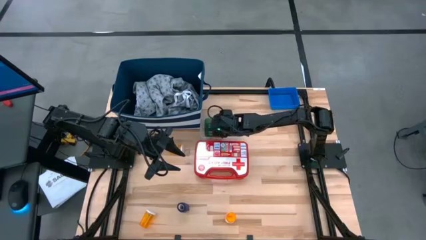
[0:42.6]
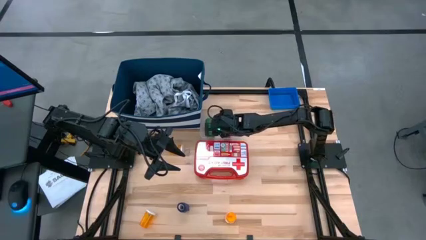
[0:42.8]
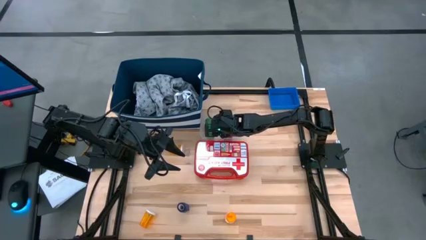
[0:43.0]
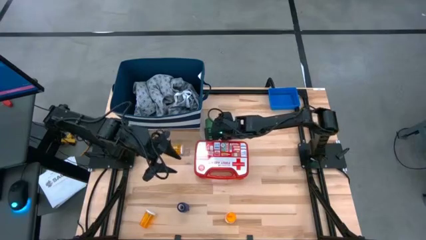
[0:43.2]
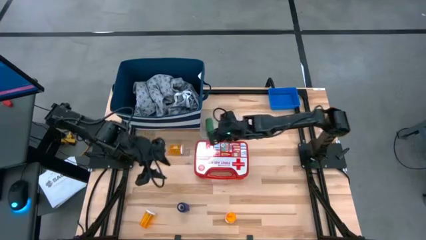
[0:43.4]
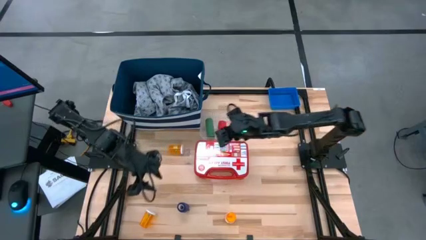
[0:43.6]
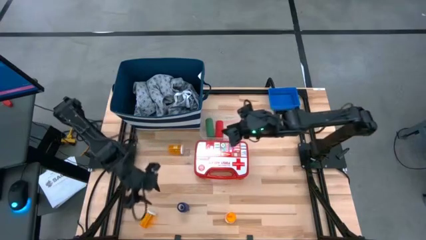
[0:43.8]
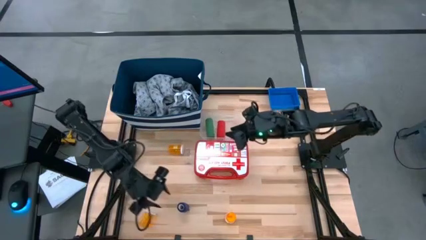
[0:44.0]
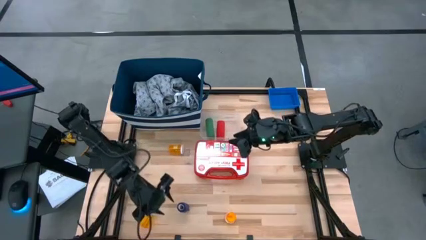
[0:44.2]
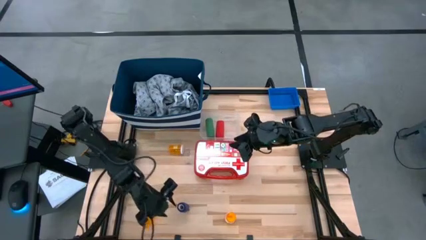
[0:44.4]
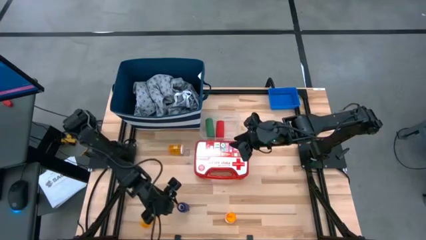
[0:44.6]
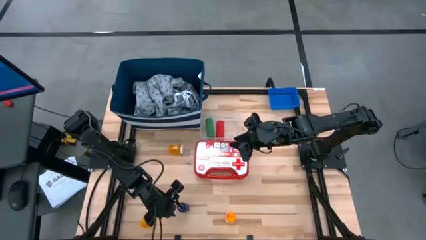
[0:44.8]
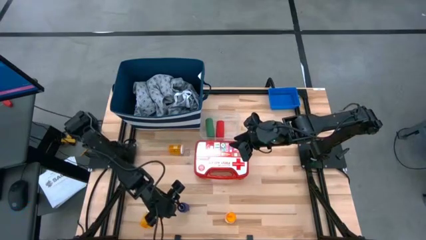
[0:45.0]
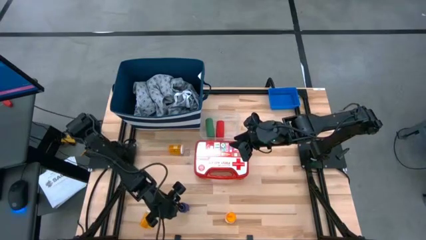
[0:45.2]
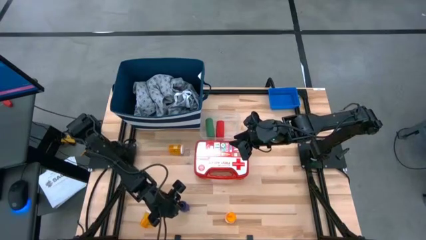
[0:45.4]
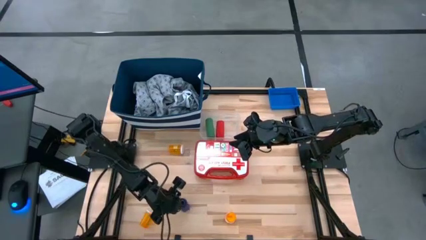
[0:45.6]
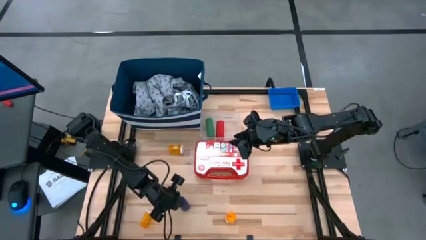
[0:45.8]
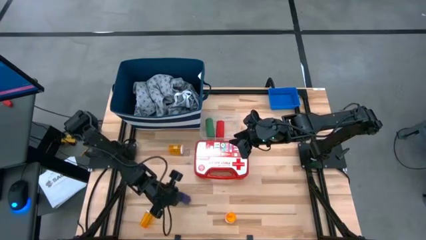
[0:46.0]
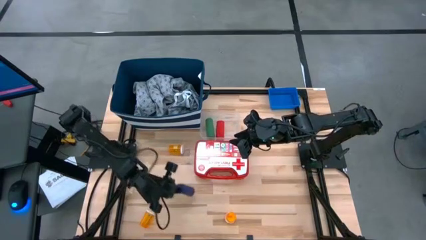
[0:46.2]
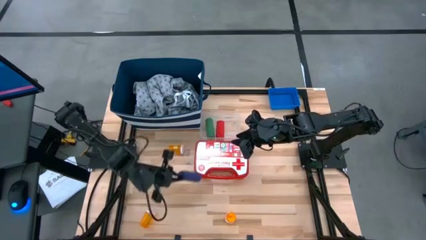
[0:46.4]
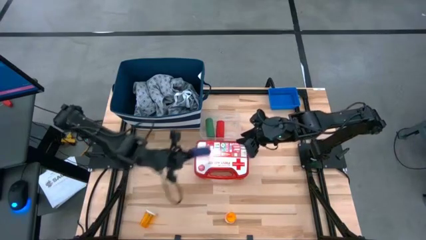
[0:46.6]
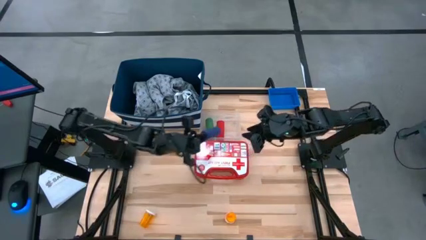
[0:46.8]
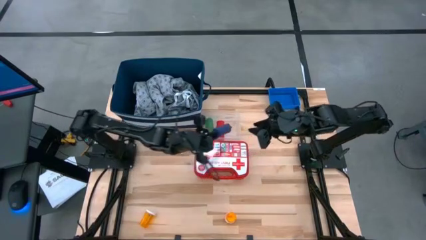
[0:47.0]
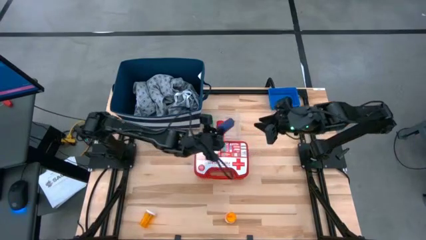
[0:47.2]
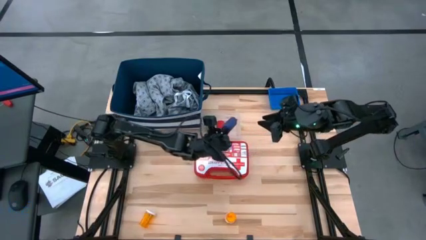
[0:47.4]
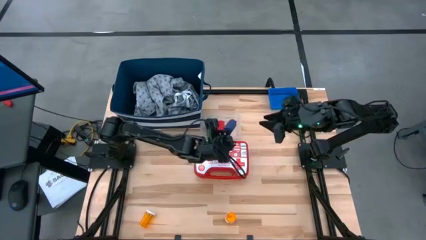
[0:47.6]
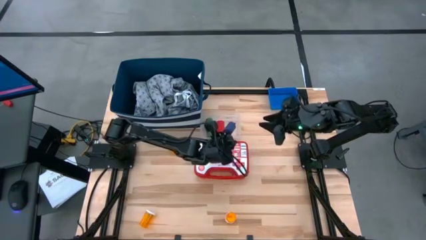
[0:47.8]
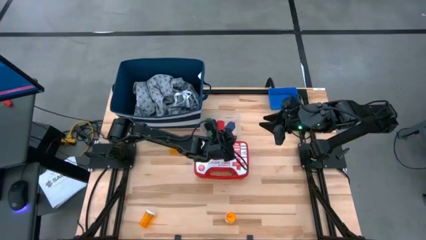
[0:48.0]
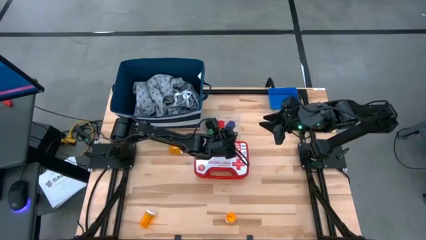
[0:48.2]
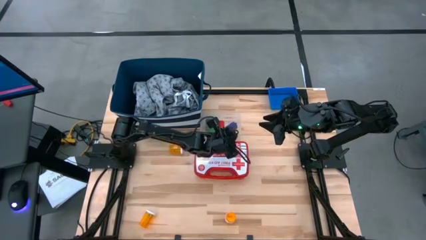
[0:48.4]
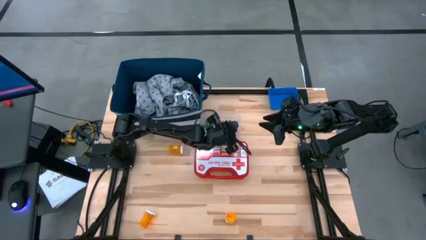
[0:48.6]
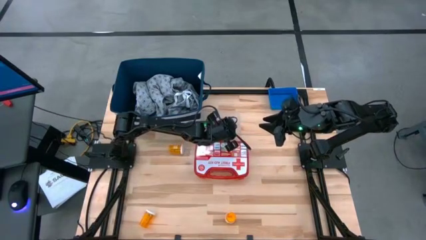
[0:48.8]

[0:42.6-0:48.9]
Task: Pick & place medical supplies in basket/bin
Put the rolled blue bandage into the transparent bin

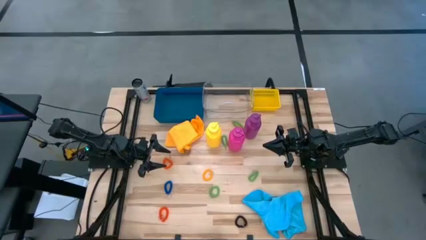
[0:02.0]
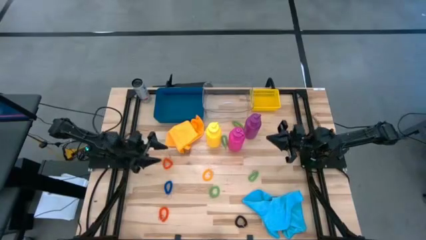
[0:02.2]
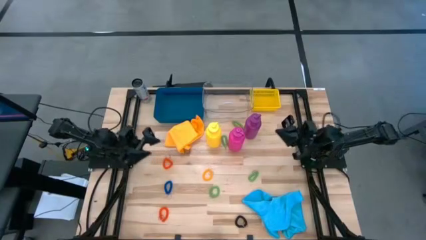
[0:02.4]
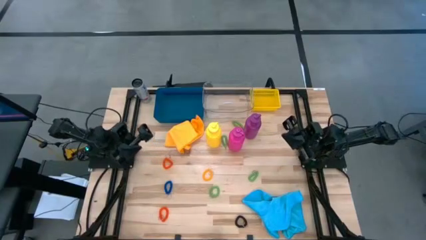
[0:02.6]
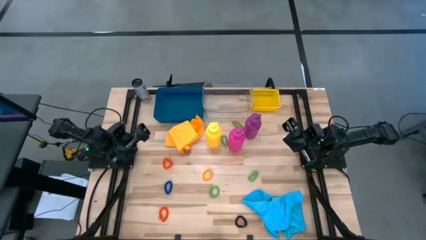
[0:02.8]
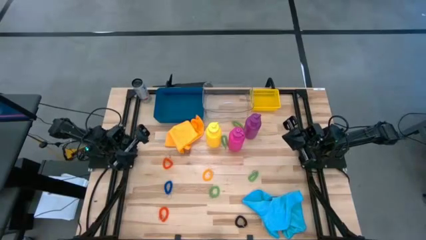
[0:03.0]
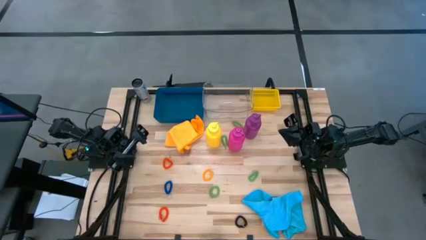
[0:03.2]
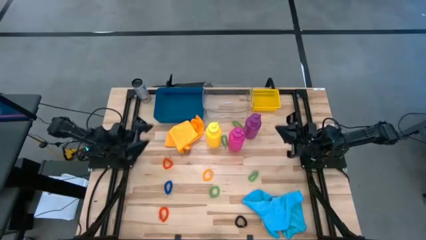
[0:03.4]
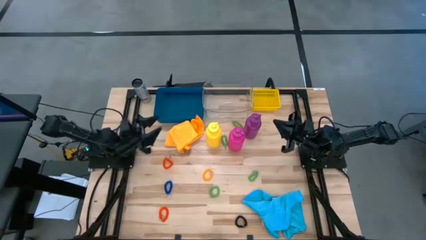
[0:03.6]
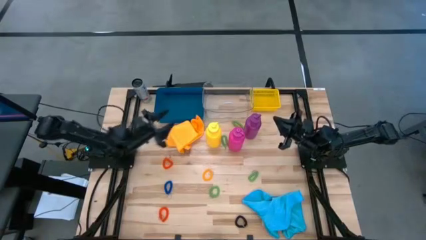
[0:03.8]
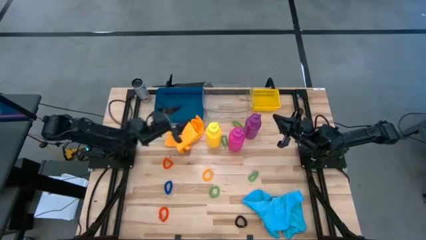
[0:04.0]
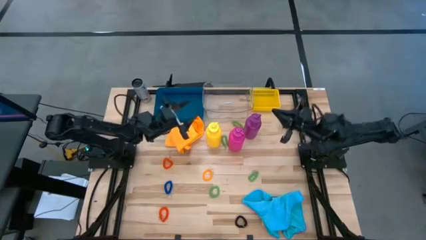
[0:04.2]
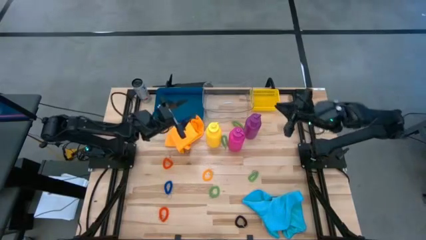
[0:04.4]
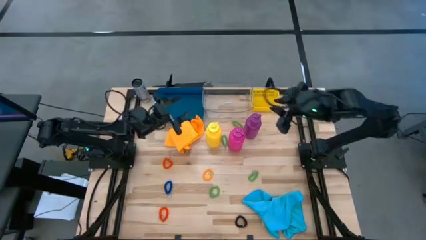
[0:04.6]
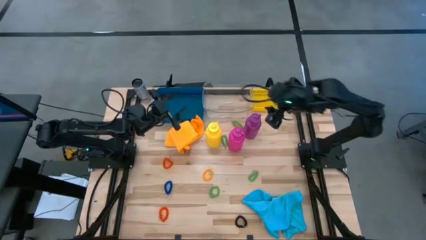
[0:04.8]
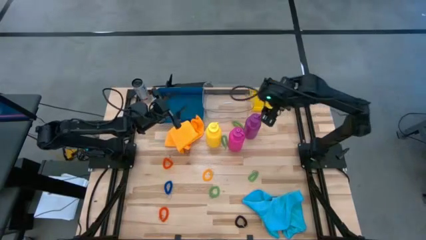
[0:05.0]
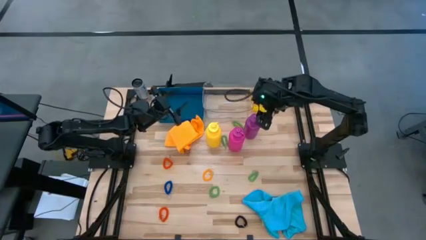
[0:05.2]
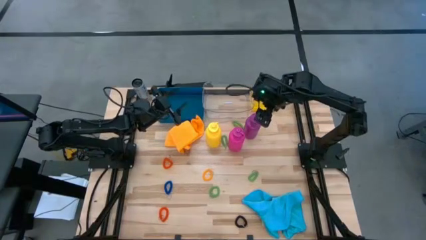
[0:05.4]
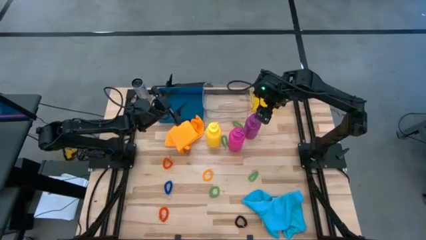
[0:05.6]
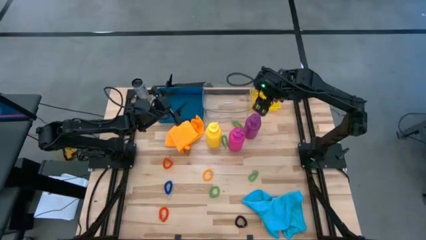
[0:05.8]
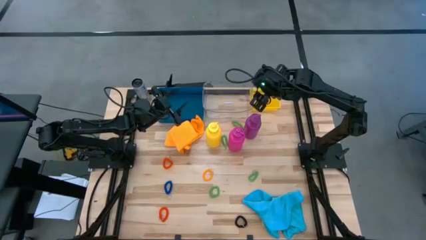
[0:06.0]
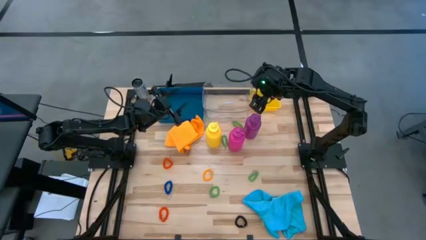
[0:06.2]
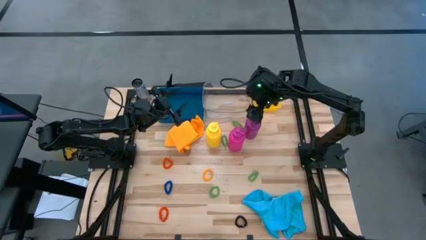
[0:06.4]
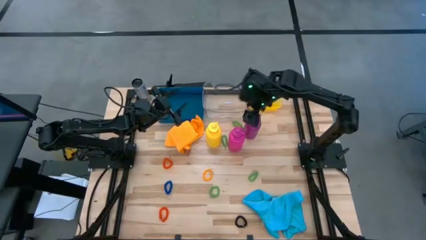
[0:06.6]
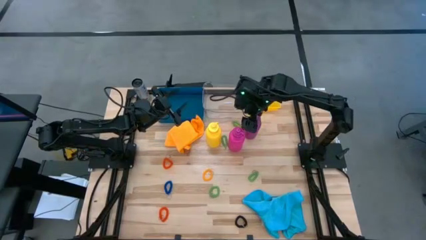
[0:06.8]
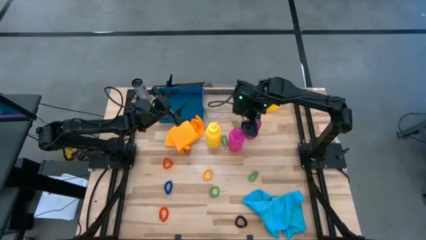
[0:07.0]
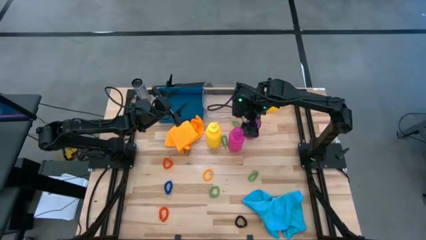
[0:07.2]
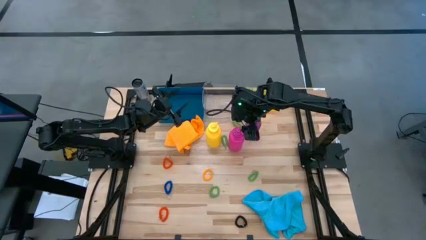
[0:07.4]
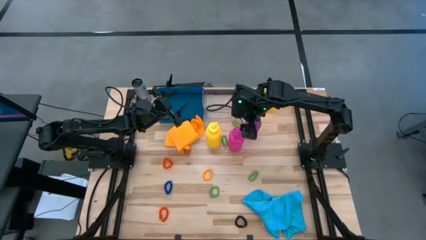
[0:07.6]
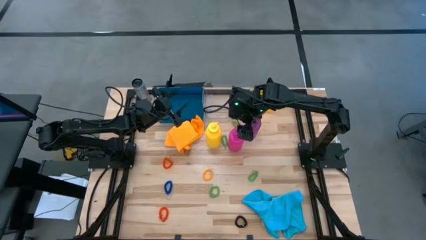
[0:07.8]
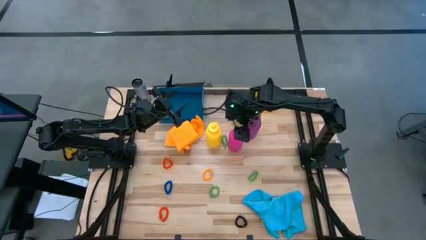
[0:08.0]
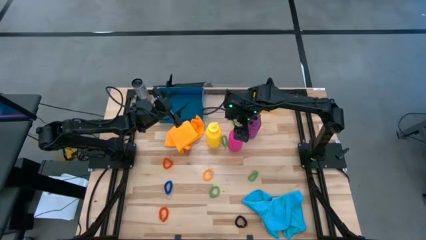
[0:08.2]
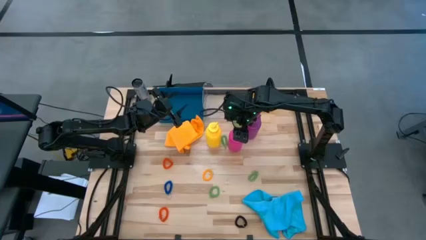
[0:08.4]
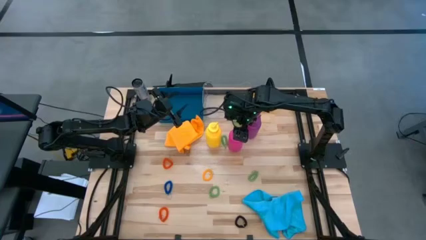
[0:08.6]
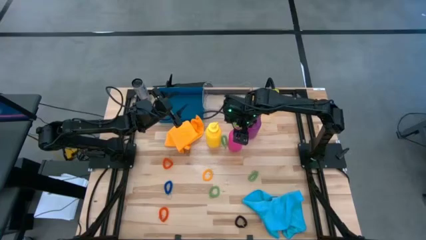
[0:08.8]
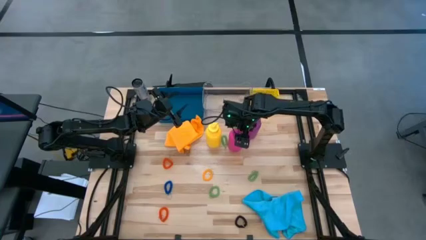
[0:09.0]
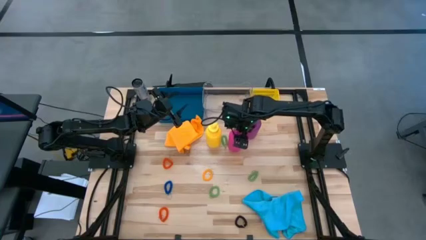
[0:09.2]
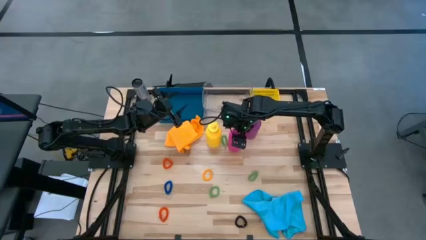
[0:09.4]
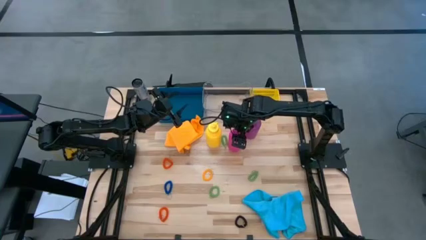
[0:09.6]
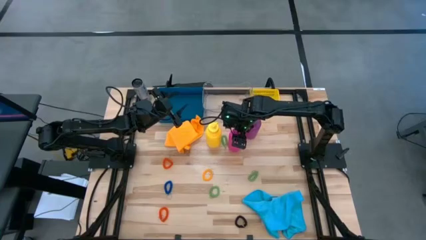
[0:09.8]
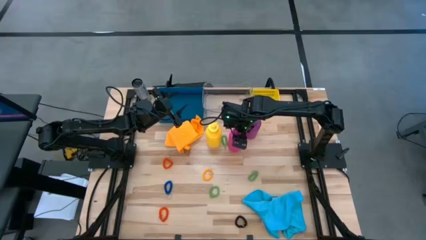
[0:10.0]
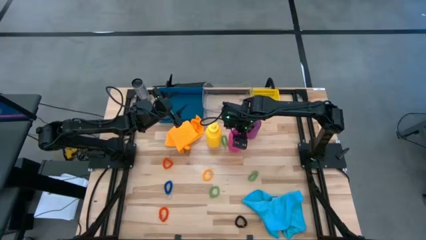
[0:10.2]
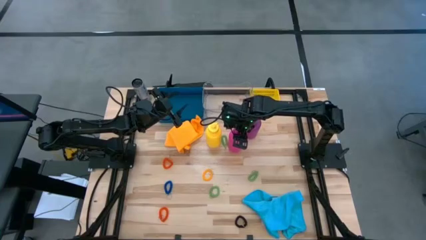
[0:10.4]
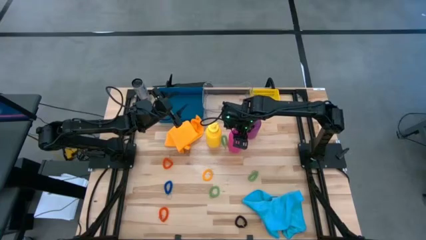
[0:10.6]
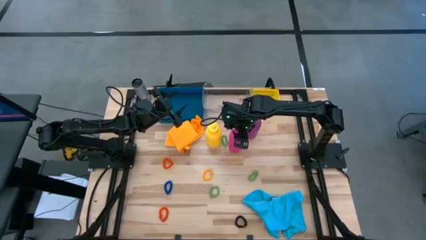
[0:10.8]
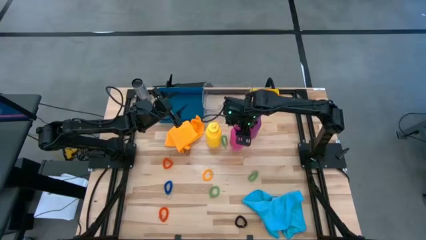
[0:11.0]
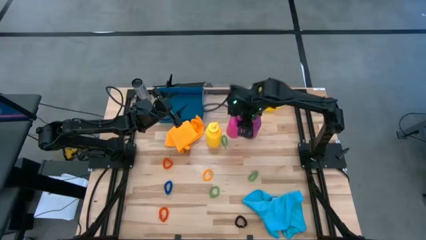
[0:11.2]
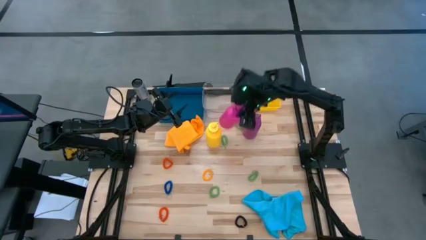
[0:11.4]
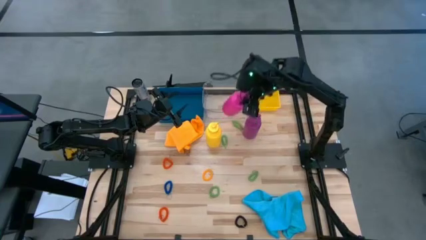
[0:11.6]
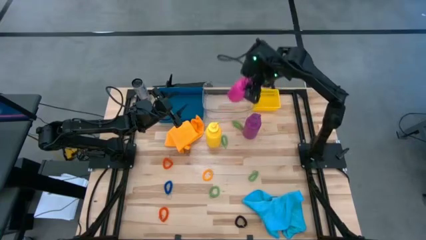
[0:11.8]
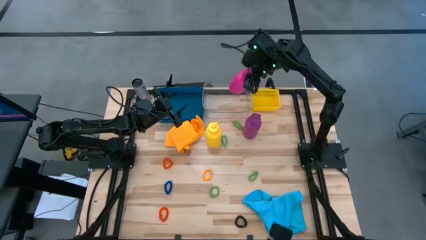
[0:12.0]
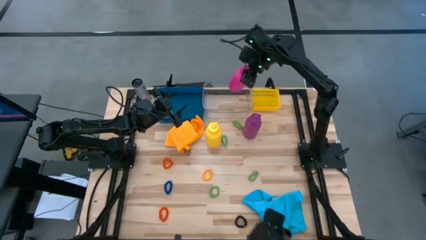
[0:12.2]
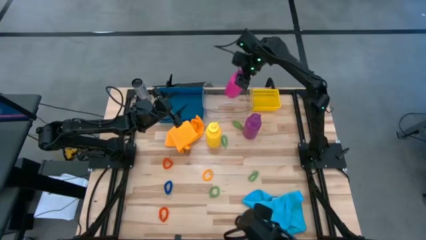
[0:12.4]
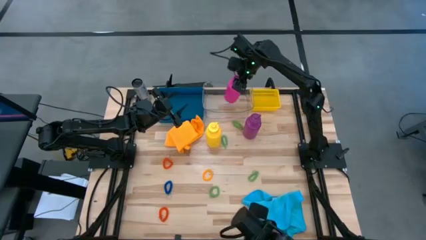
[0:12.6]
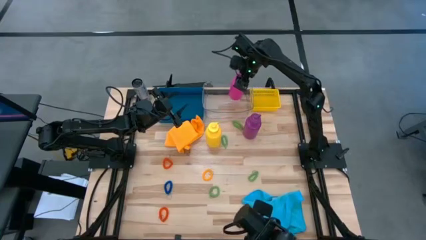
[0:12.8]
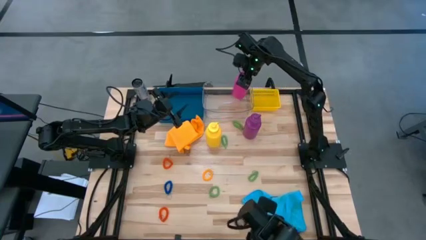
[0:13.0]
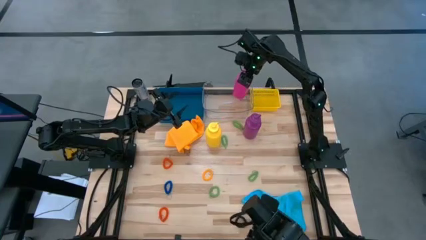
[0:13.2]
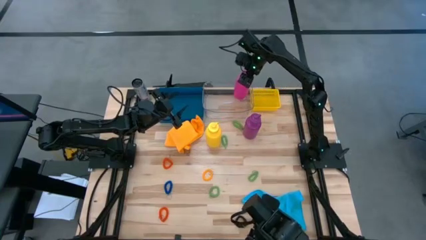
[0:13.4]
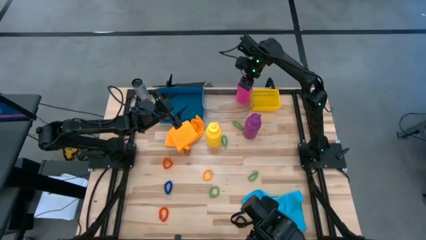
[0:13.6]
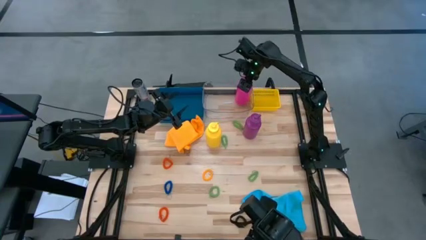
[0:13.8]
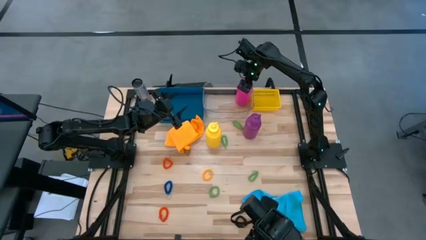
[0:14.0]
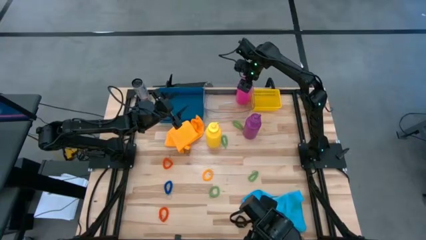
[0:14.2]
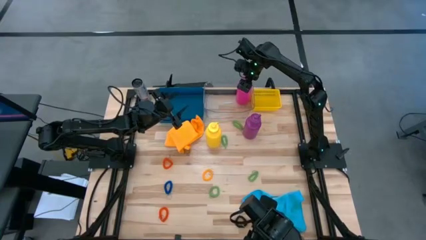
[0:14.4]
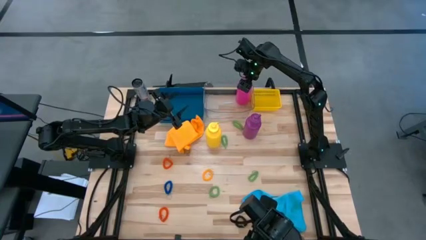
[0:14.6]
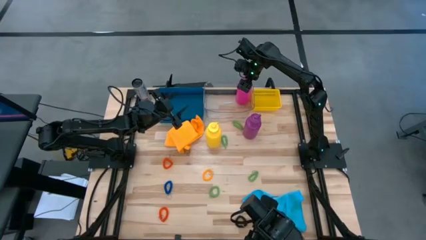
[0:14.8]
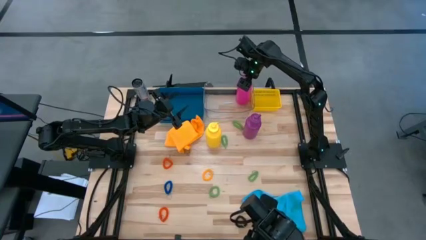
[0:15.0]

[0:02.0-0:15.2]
Task: Pick & Place Sports Items
Put the pink tumbler into the transparent bin
